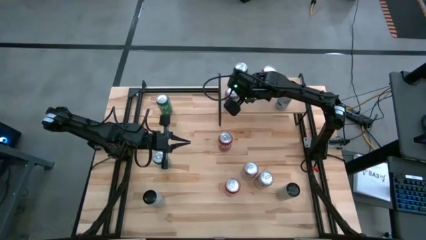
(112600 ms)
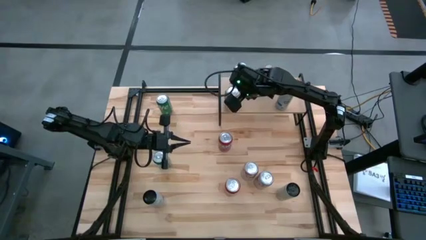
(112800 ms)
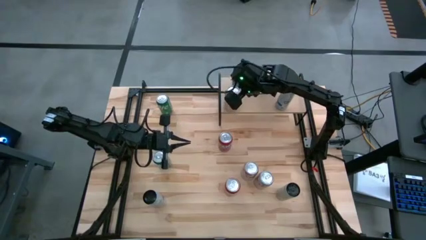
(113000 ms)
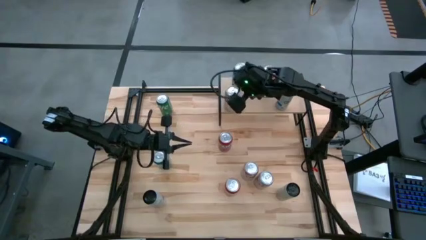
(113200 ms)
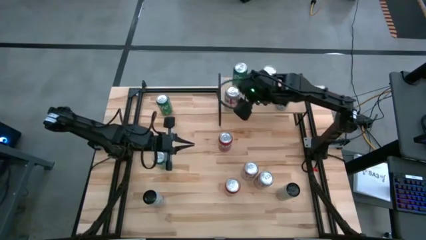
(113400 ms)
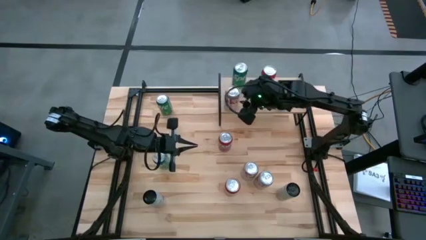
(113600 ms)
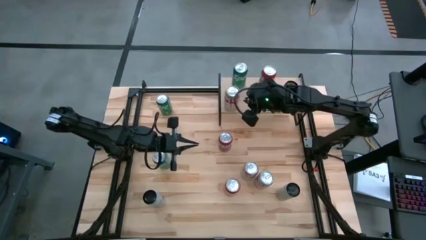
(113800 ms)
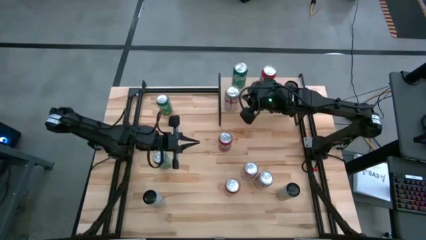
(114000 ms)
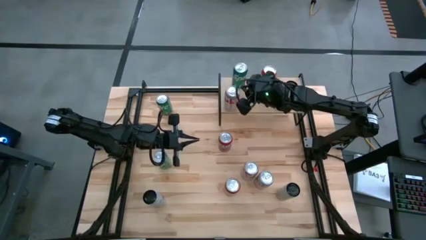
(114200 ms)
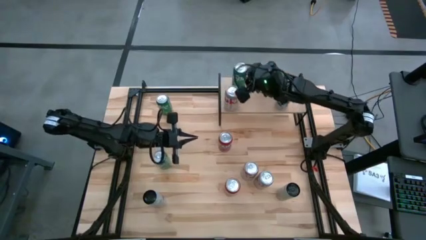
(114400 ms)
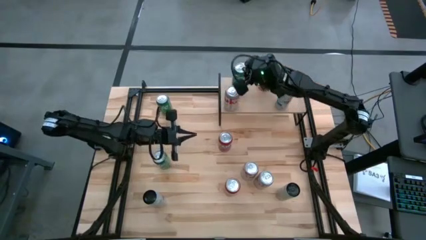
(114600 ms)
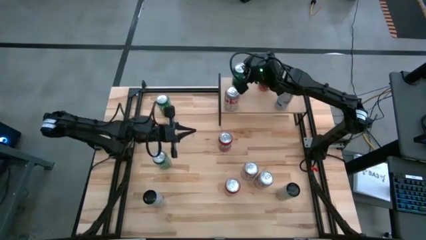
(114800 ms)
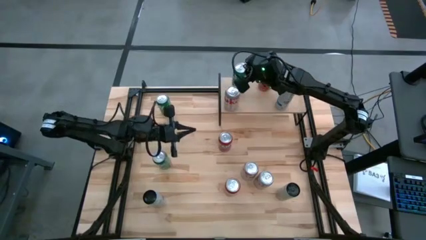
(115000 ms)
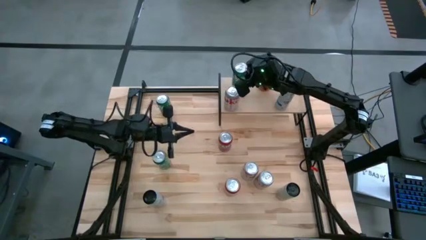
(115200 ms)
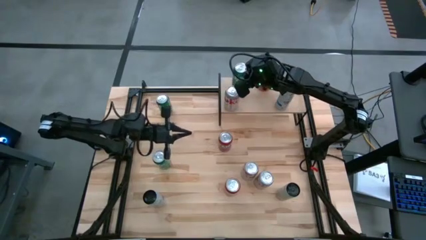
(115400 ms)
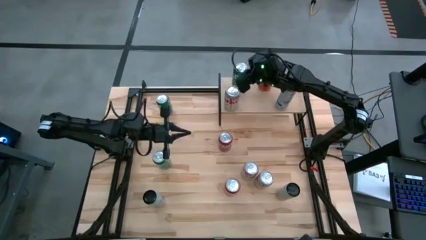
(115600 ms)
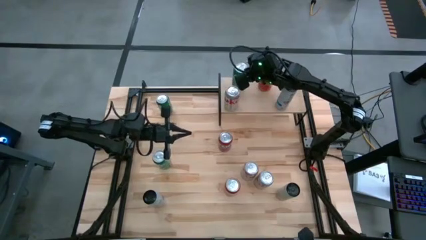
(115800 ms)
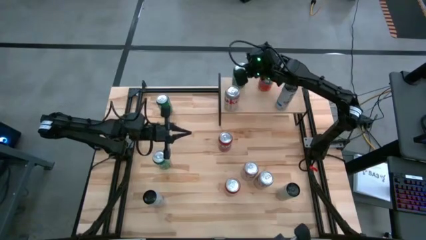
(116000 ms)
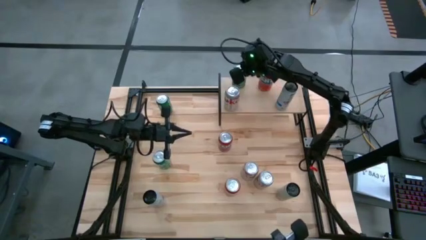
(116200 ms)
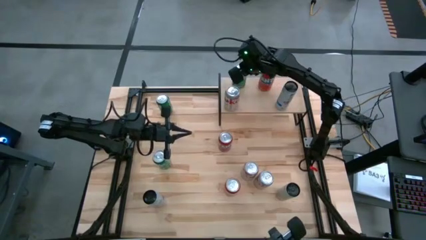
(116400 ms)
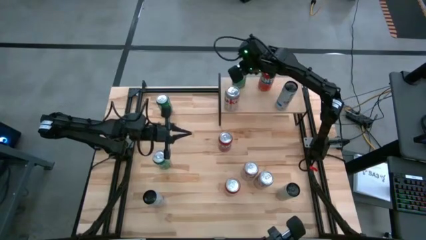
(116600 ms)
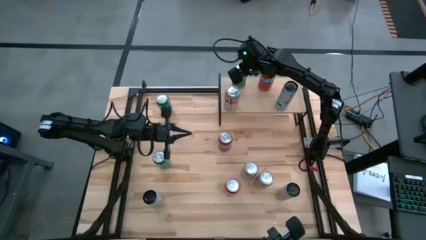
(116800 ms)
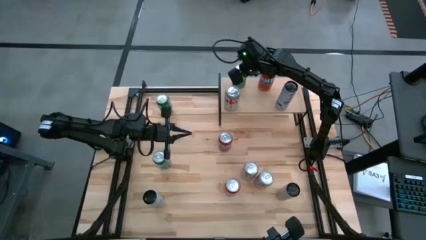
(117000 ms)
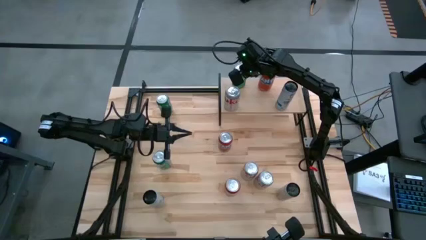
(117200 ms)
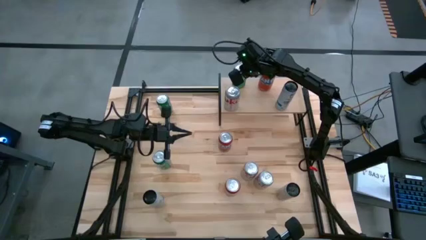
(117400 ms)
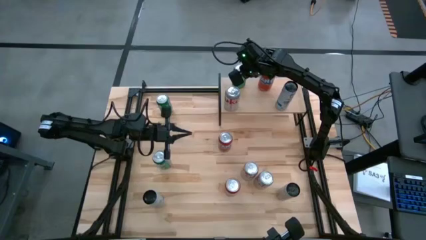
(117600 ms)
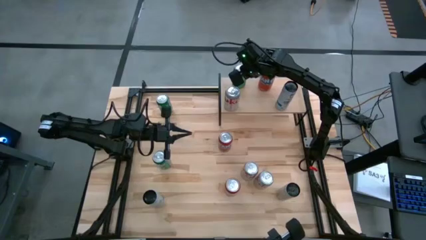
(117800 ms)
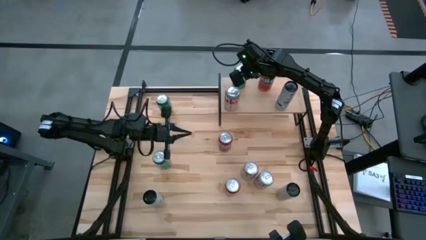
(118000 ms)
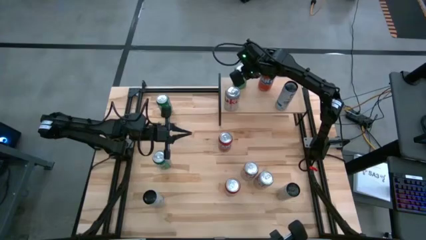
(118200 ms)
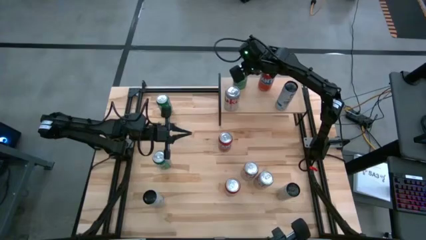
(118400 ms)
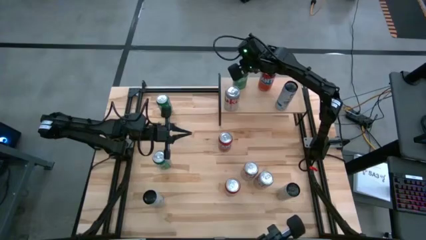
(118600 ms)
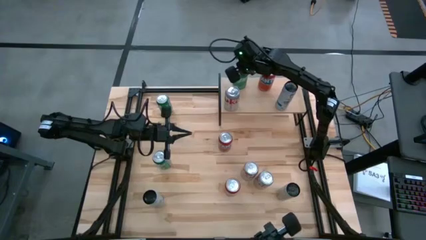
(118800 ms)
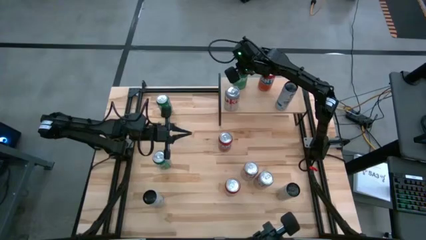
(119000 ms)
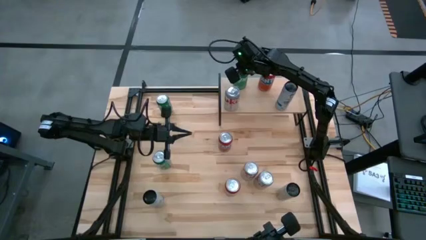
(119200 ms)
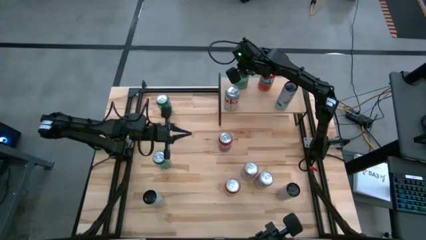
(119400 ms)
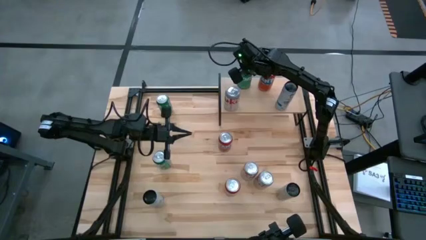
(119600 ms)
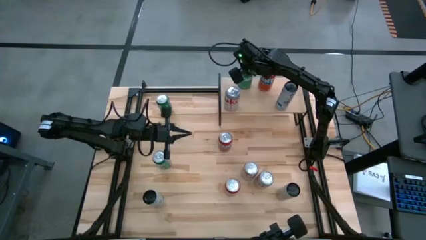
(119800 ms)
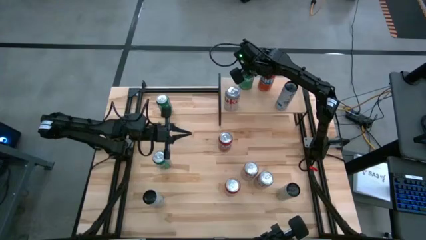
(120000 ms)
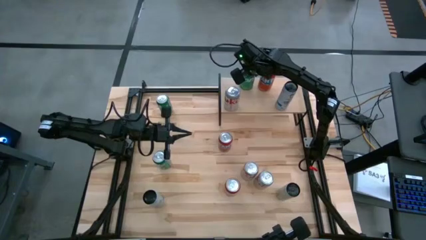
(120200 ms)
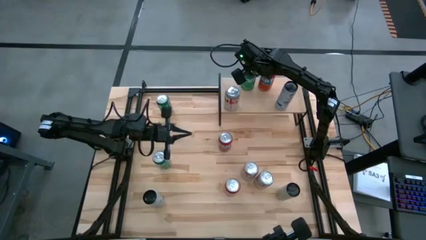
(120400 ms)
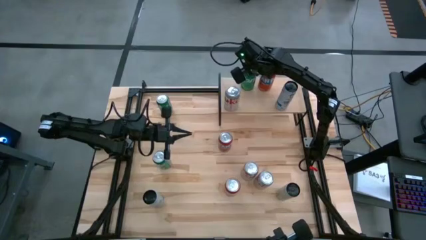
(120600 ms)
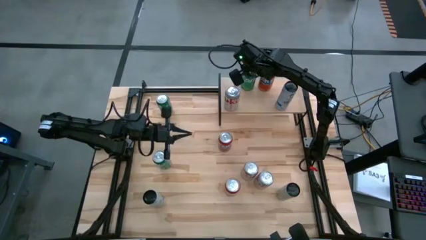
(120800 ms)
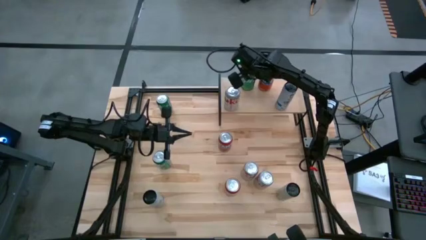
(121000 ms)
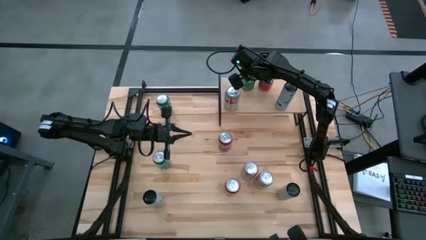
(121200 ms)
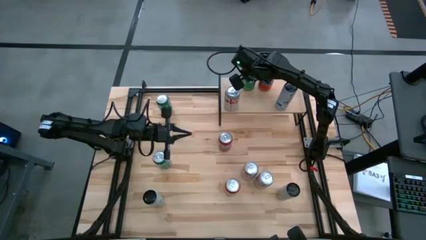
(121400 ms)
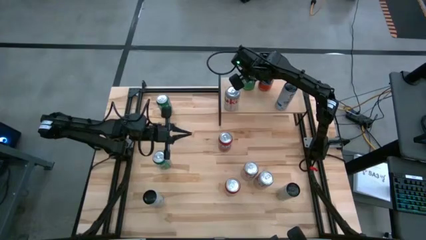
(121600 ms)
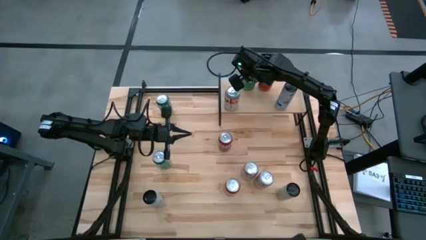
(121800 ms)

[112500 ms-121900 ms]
Task: Place canned beverage on shelf
Adjust the green soda can on the shelf

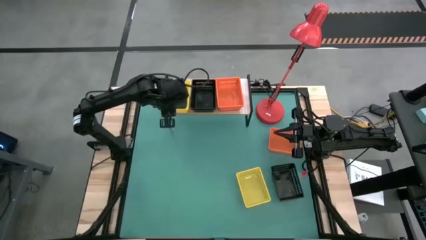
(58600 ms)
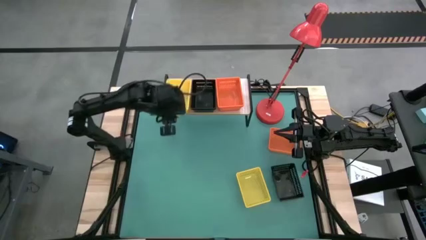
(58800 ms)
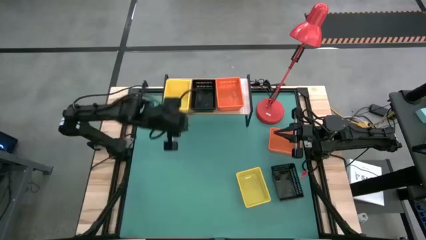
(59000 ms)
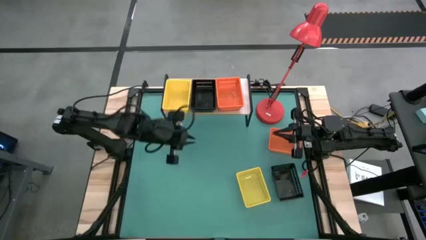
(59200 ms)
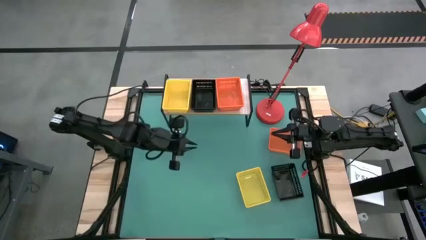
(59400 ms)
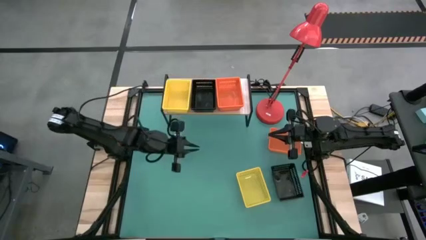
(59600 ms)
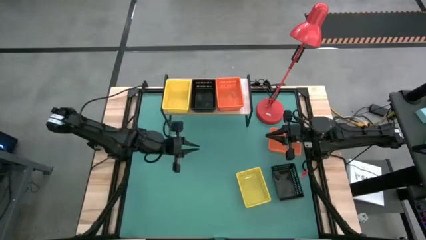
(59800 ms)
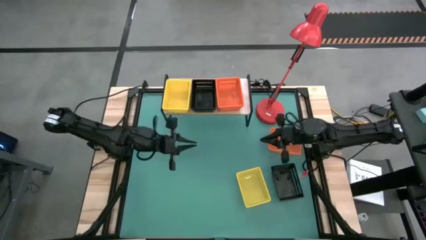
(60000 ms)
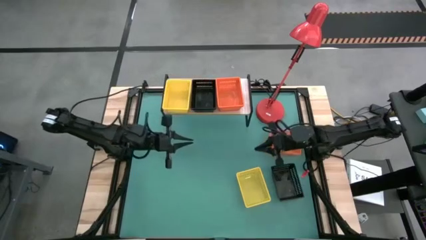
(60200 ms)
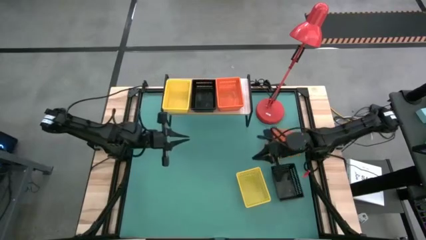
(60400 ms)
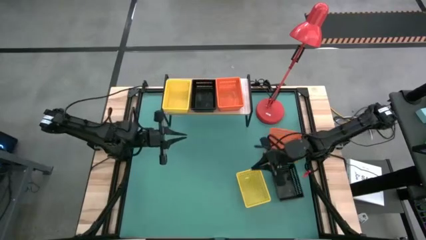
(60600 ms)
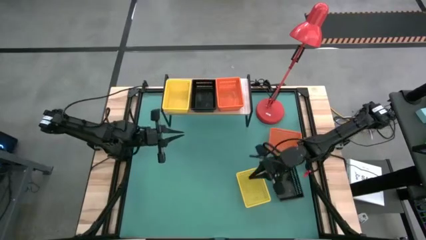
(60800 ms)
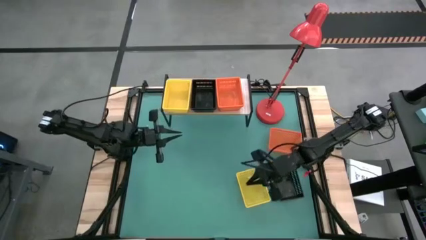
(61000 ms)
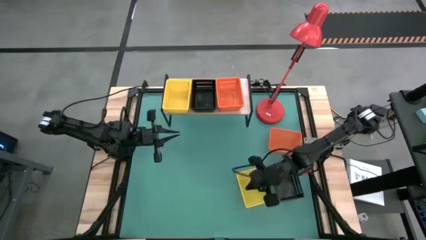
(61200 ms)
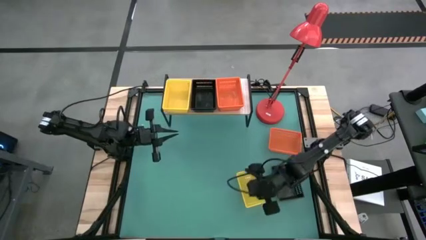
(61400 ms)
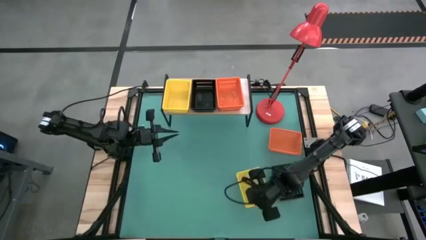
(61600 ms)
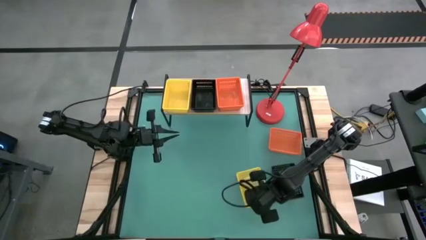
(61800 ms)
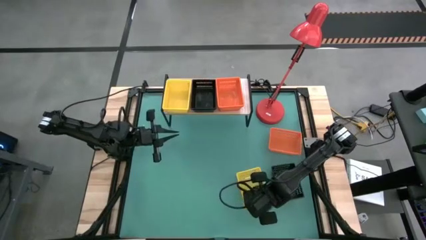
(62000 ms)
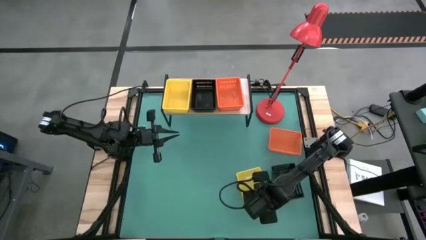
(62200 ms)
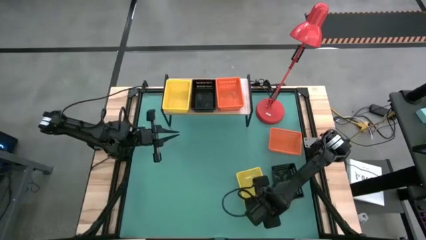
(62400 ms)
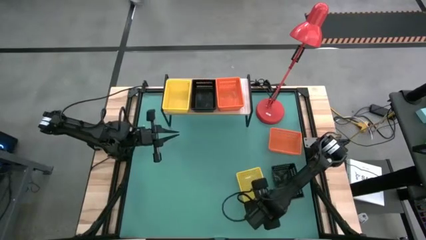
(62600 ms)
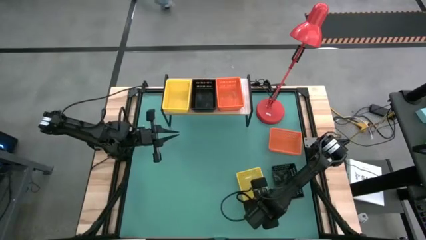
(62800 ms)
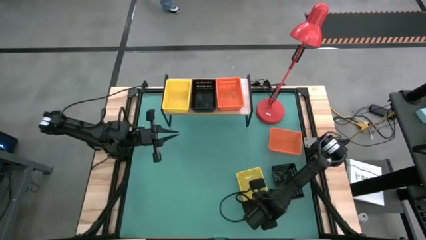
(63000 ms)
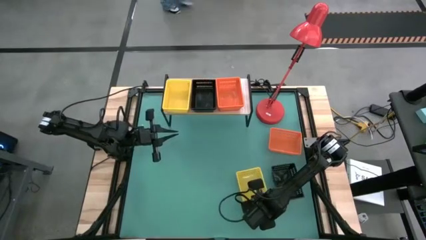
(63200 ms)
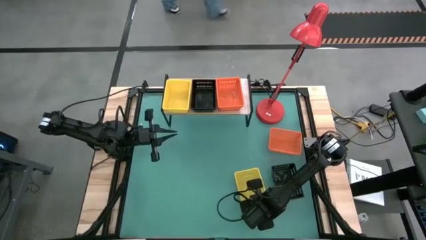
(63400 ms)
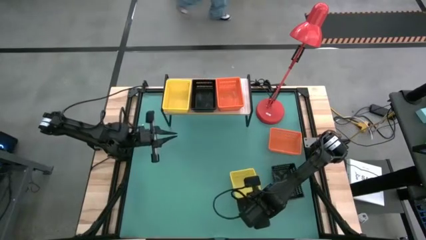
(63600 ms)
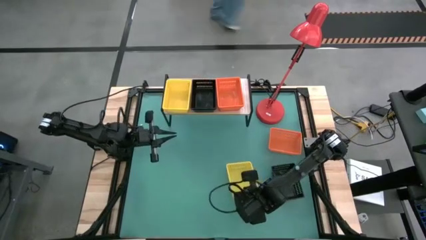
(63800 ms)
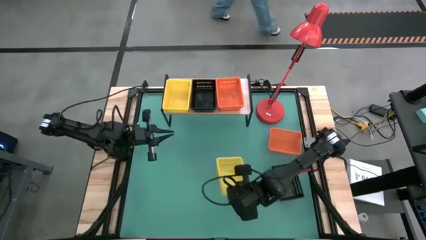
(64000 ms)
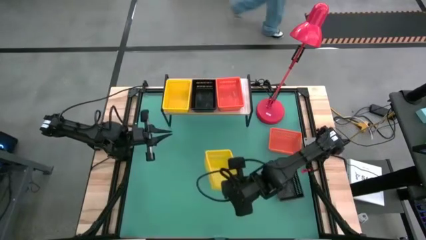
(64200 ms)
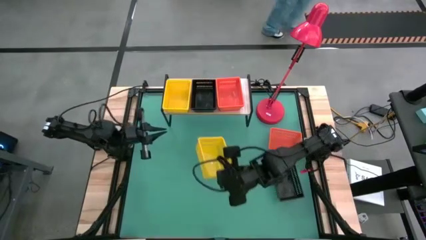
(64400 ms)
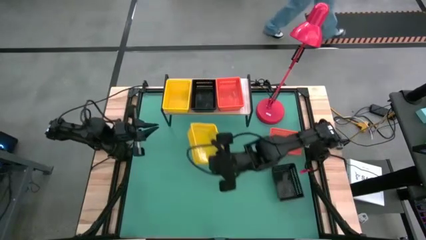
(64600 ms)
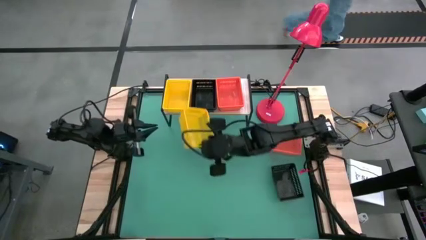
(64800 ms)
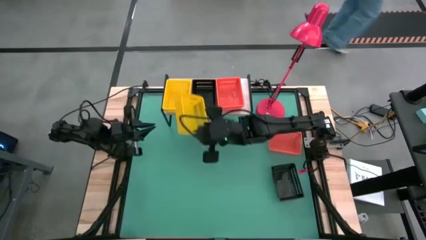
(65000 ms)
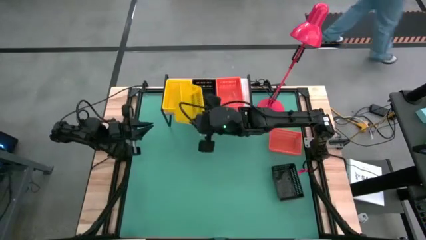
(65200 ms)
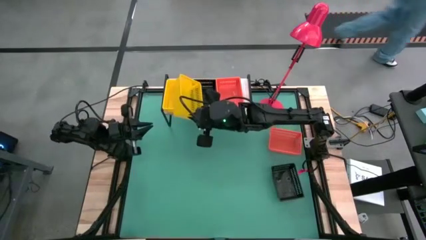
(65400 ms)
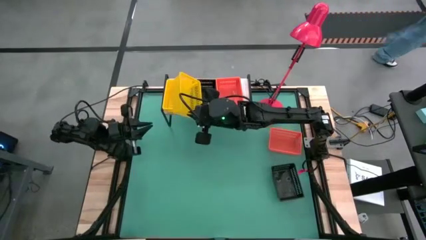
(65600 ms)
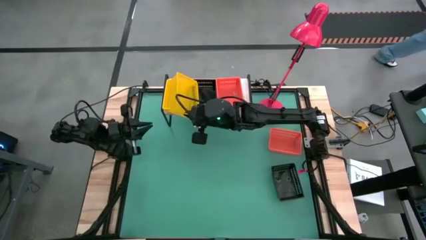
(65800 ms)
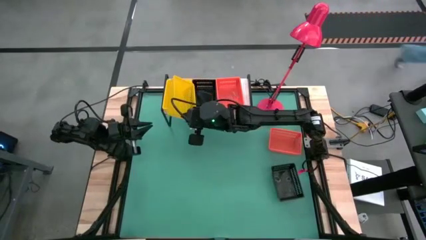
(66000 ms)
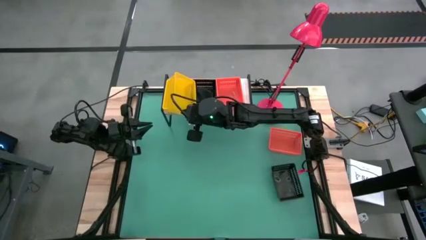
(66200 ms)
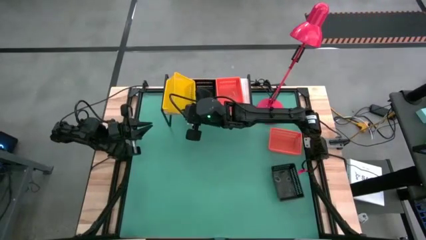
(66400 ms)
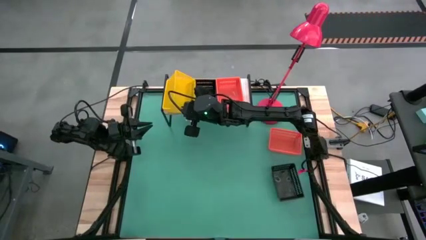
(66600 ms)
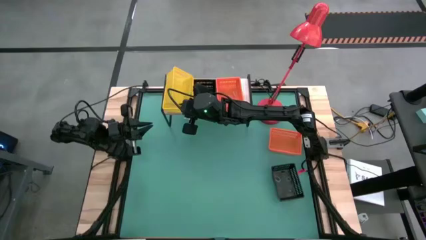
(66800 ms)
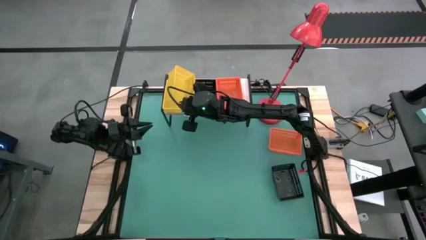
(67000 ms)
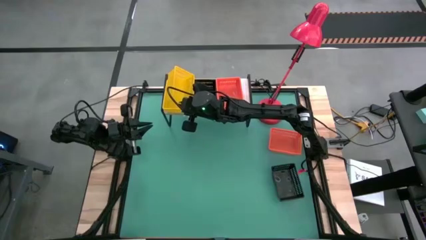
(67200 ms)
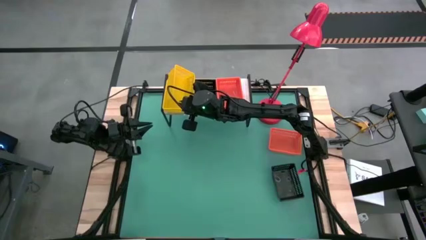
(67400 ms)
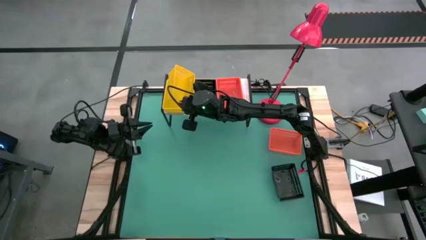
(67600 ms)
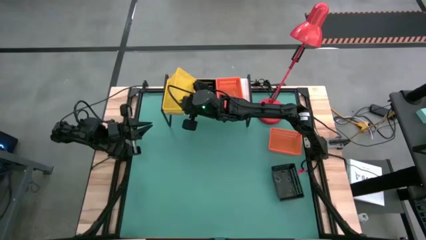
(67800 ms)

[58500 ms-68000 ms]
Task: Stack baskets on shelf by color
Stack the yellow bin on top of the yellow bin on the shelf
